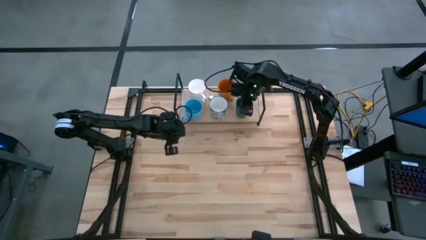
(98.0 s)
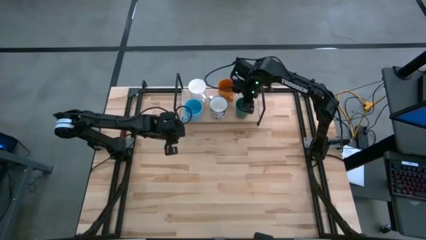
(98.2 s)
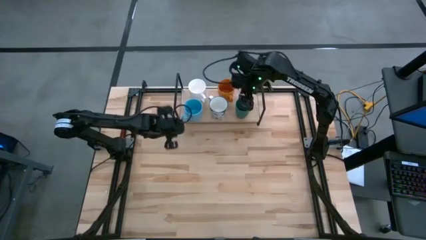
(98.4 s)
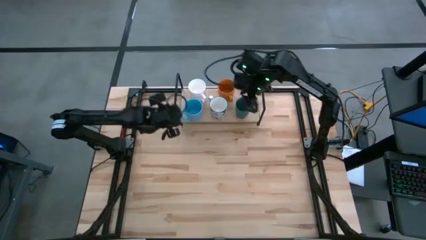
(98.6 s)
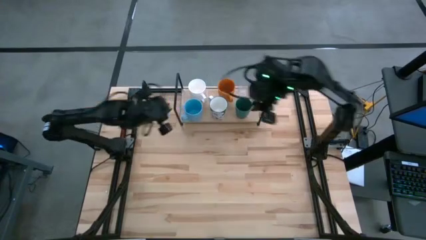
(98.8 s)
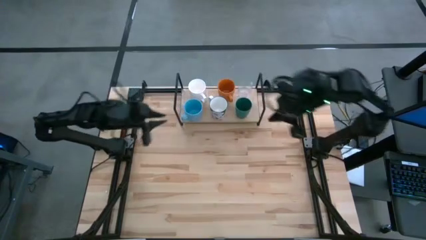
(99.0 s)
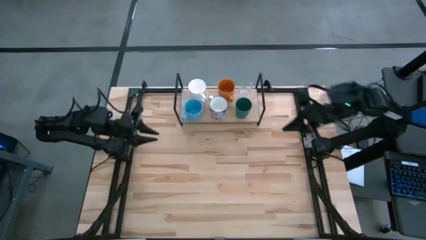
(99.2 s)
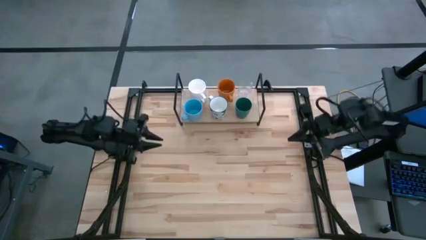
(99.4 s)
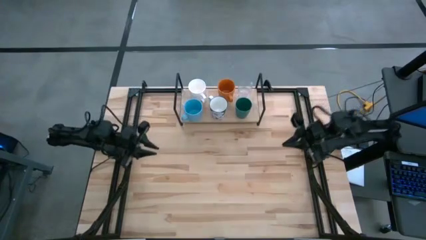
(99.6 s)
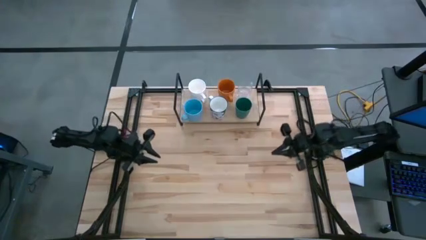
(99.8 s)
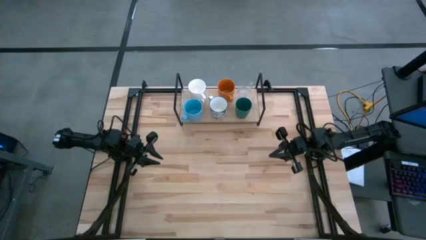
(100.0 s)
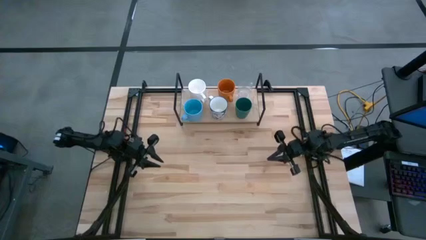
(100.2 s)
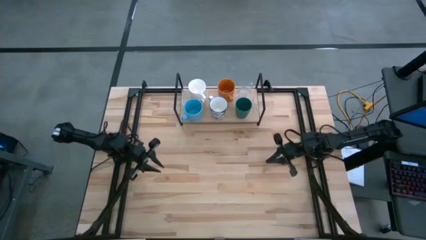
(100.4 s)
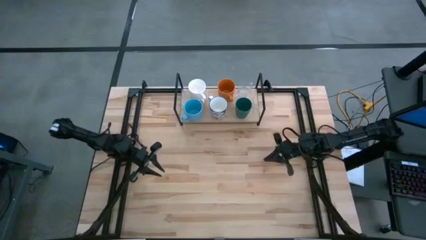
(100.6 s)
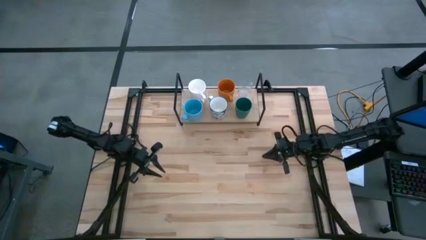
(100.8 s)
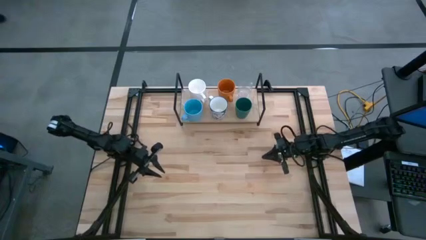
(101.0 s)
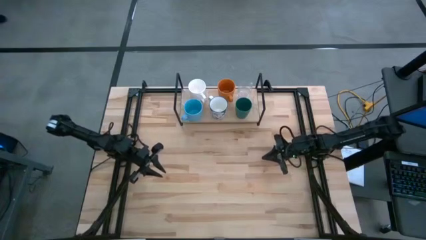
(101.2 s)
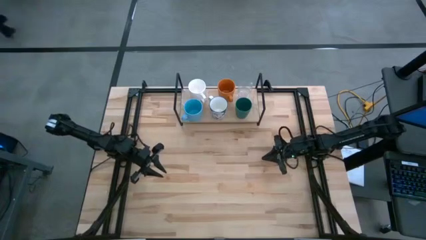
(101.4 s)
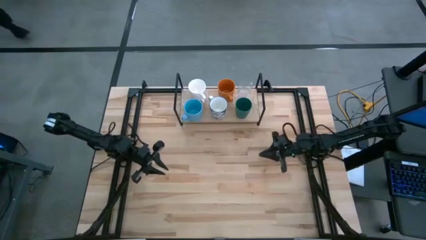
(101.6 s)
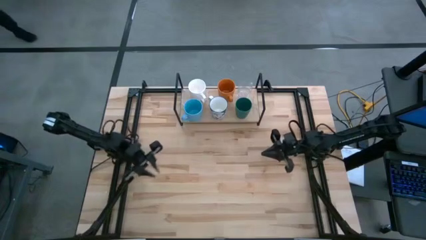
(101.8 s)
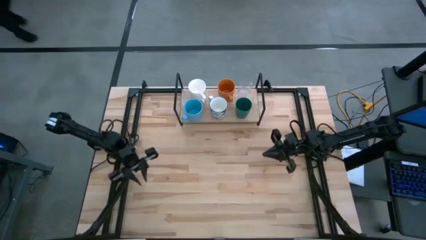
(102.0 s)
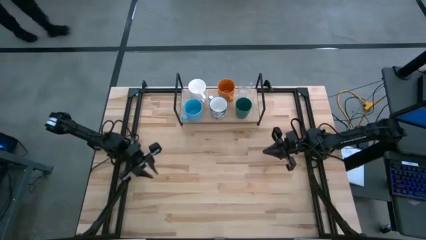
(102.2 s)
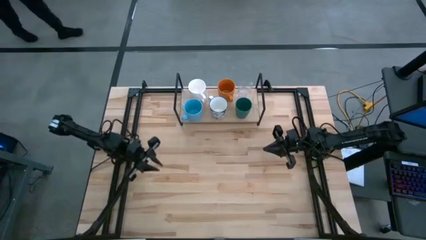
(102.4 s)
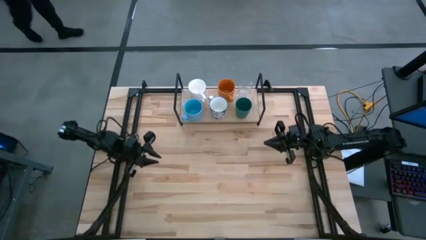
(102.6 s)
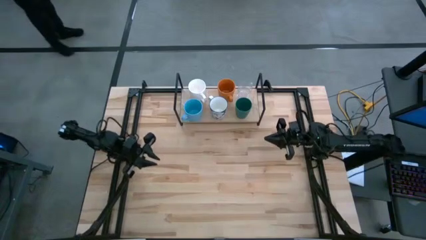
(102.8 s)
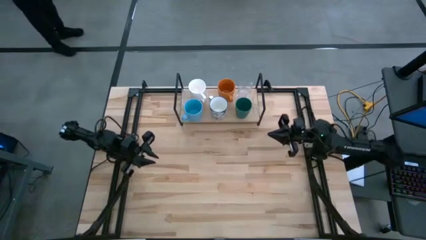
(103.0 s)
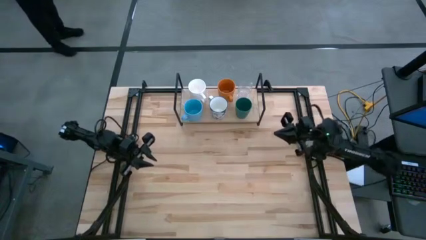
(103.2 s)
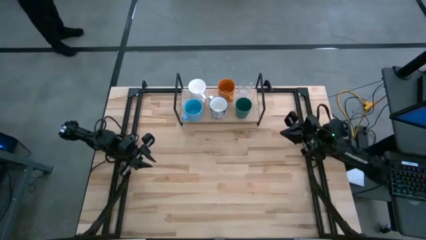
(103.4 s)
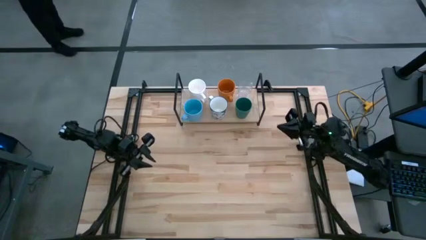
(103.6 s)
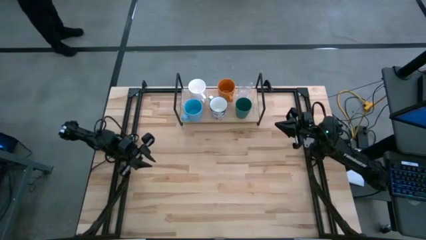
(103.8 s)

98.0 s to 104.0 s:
Task: Stack small to large cups/mugs on shelf
Return to Home Position

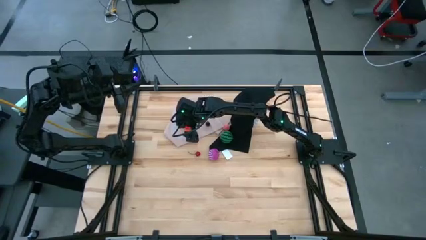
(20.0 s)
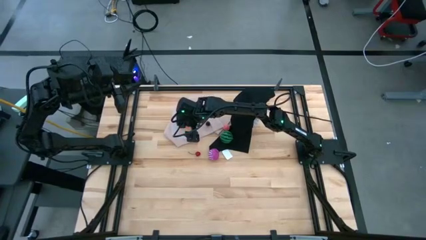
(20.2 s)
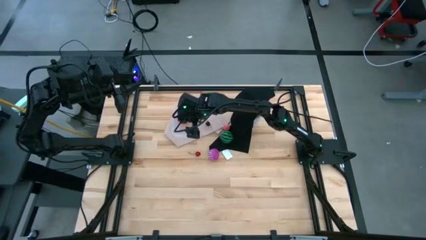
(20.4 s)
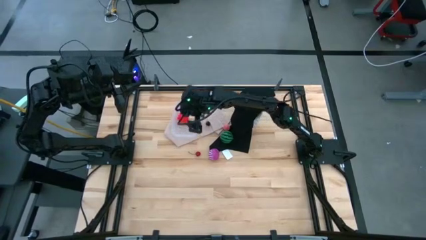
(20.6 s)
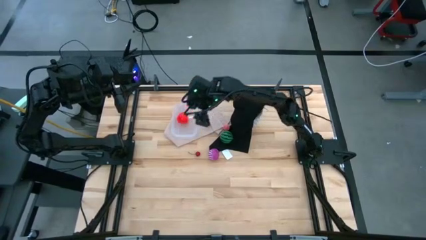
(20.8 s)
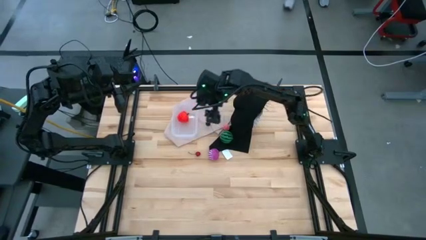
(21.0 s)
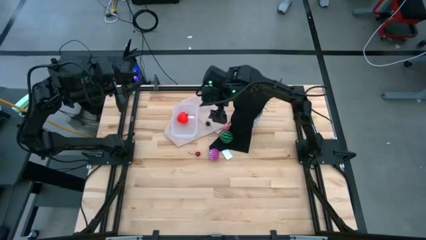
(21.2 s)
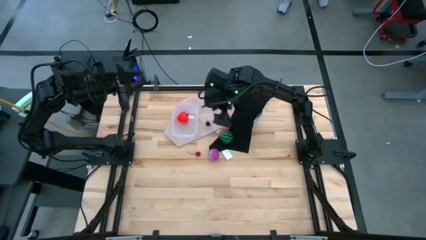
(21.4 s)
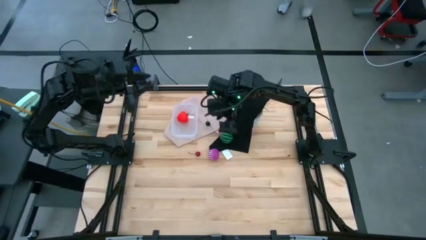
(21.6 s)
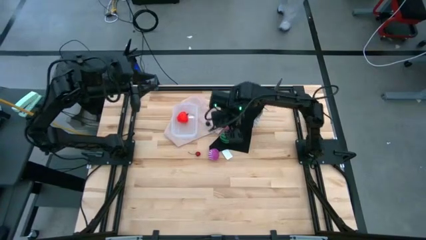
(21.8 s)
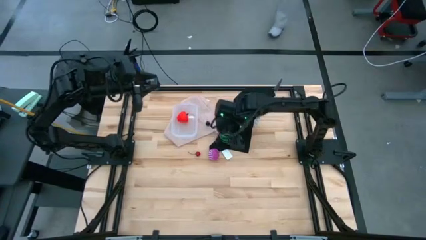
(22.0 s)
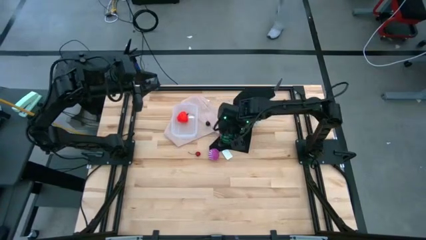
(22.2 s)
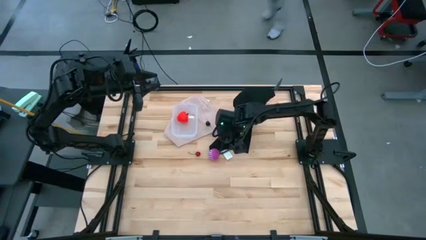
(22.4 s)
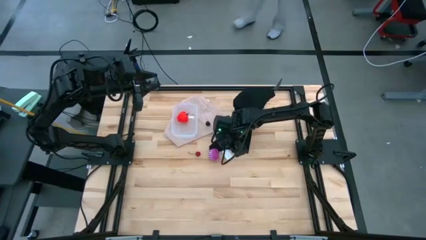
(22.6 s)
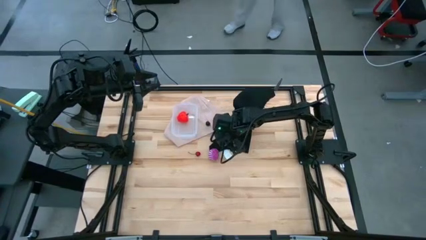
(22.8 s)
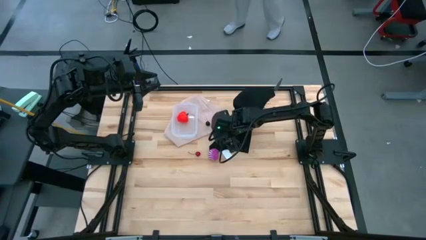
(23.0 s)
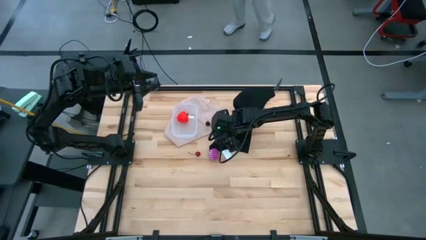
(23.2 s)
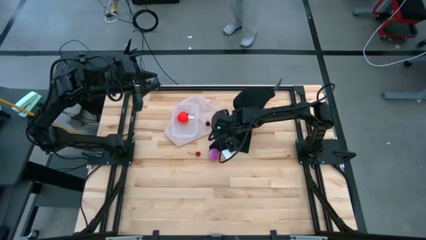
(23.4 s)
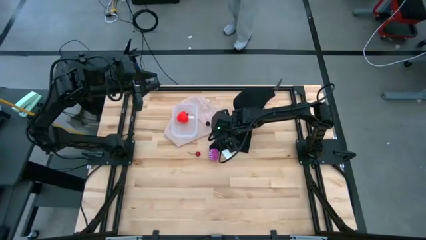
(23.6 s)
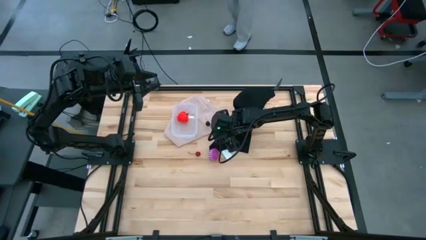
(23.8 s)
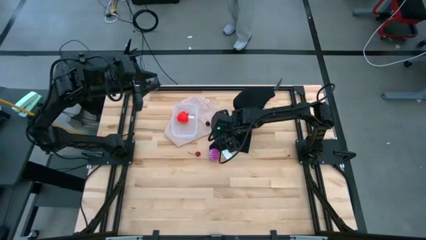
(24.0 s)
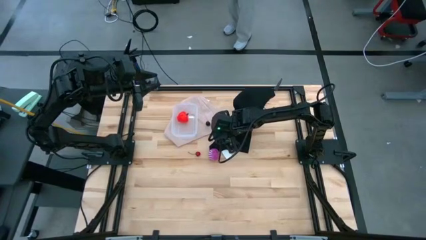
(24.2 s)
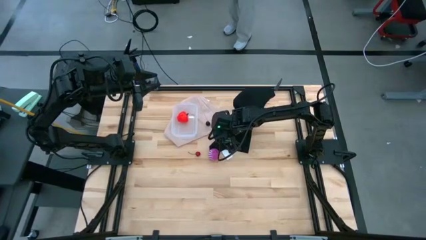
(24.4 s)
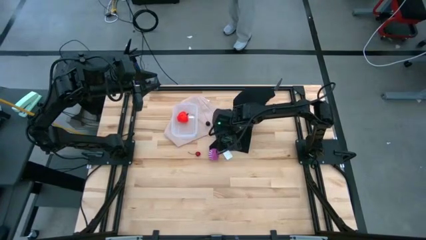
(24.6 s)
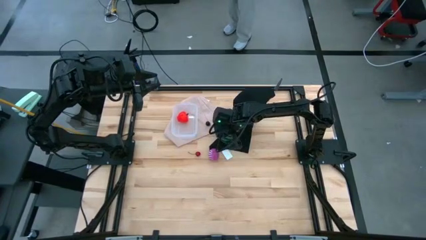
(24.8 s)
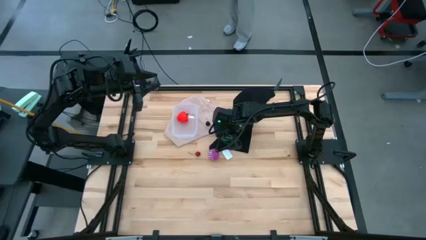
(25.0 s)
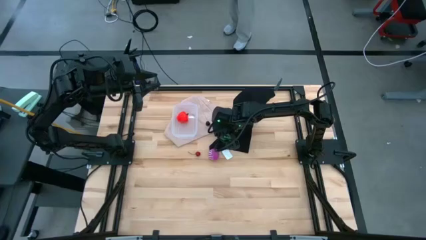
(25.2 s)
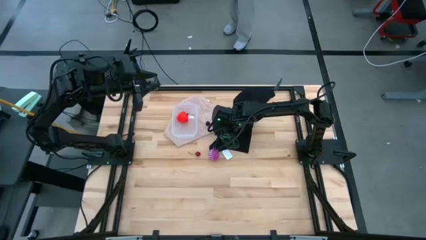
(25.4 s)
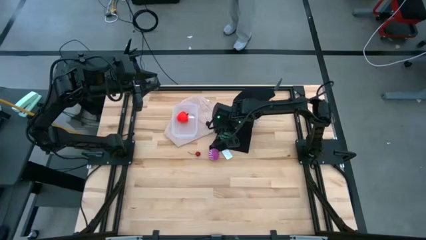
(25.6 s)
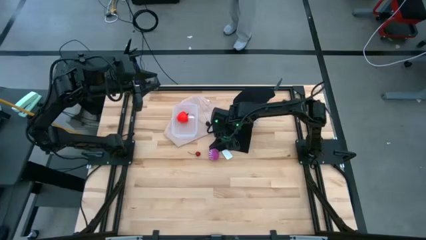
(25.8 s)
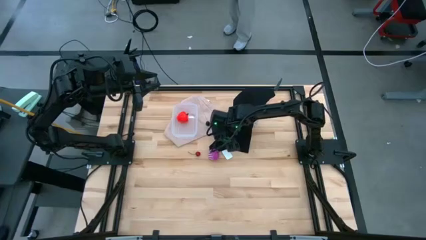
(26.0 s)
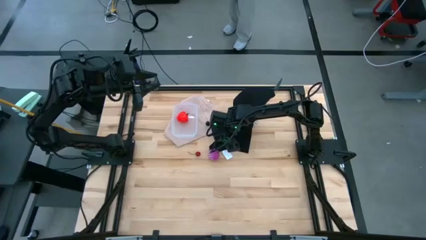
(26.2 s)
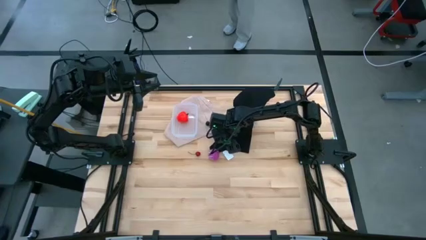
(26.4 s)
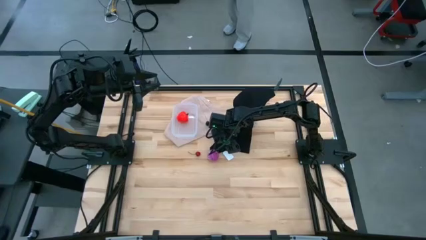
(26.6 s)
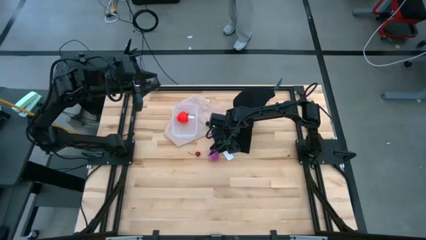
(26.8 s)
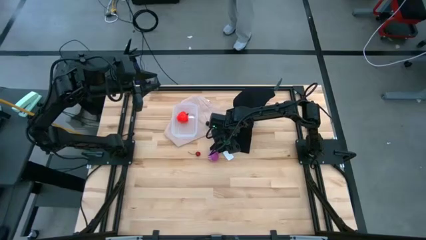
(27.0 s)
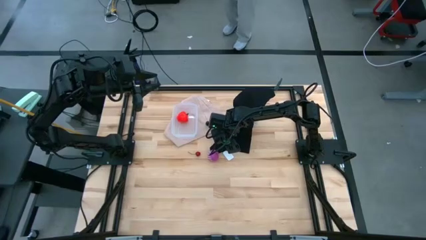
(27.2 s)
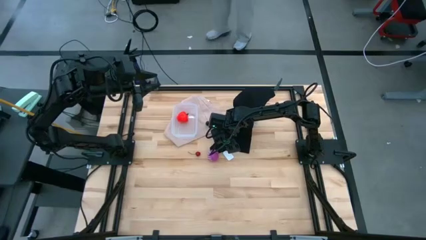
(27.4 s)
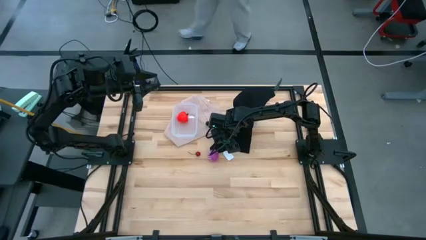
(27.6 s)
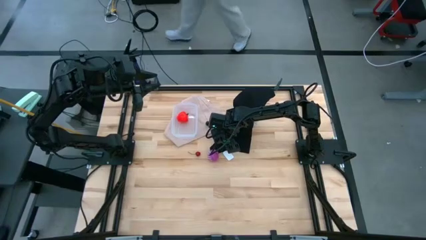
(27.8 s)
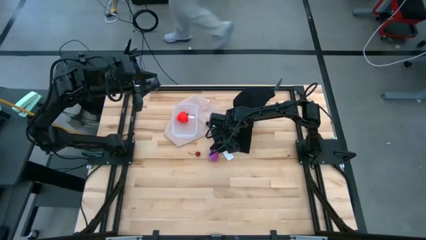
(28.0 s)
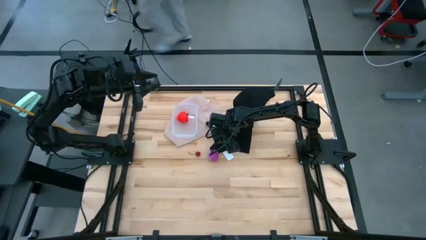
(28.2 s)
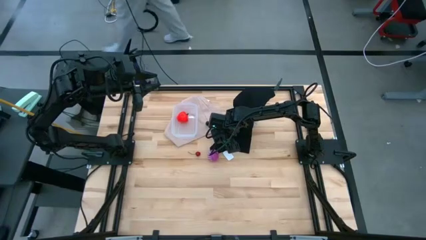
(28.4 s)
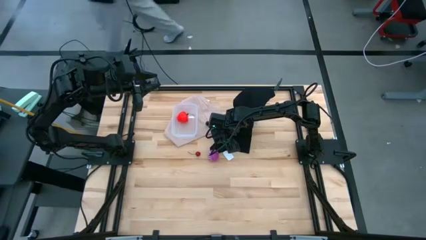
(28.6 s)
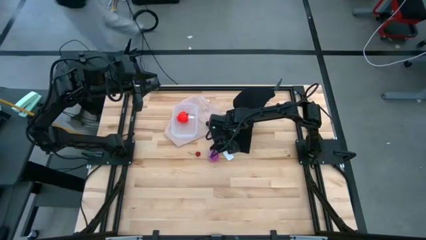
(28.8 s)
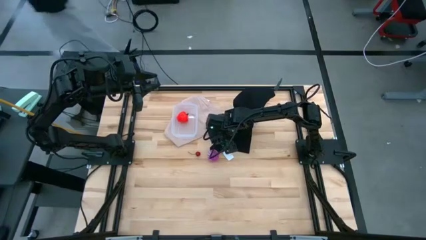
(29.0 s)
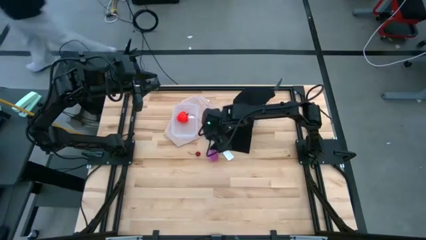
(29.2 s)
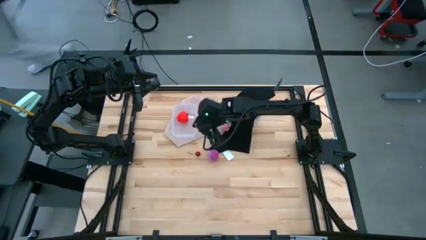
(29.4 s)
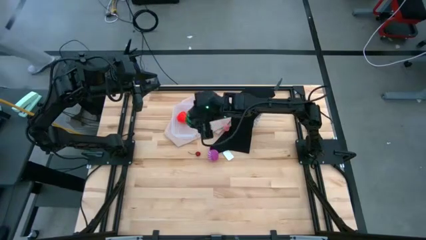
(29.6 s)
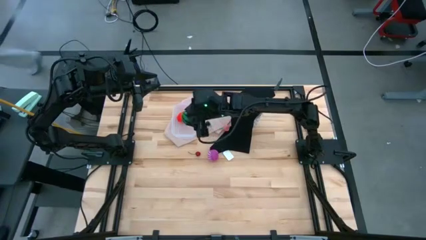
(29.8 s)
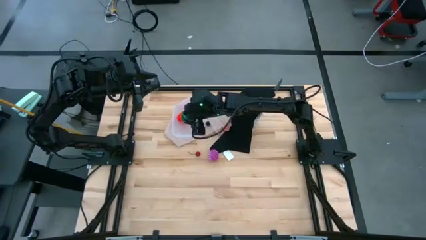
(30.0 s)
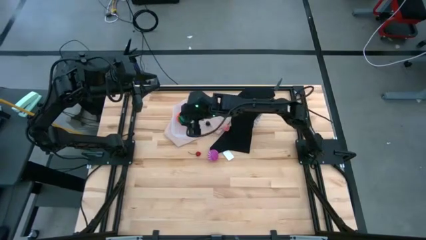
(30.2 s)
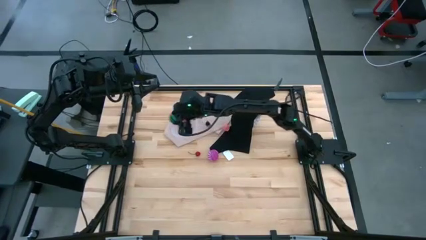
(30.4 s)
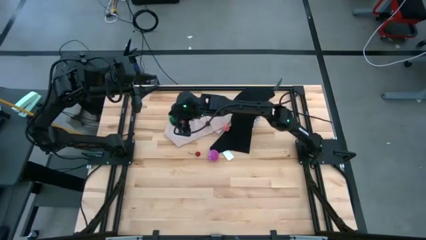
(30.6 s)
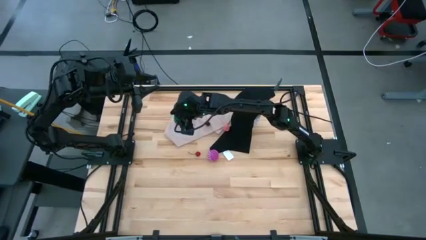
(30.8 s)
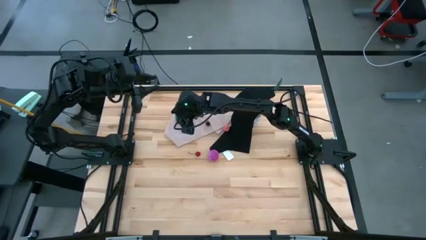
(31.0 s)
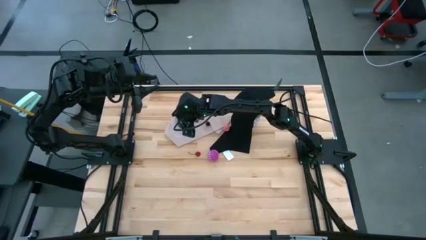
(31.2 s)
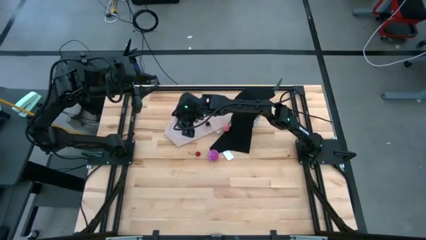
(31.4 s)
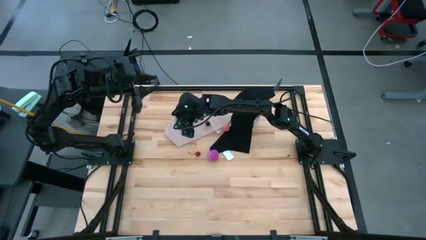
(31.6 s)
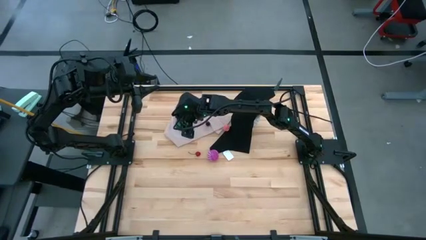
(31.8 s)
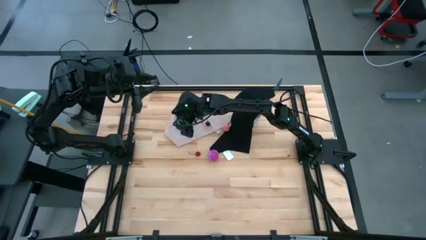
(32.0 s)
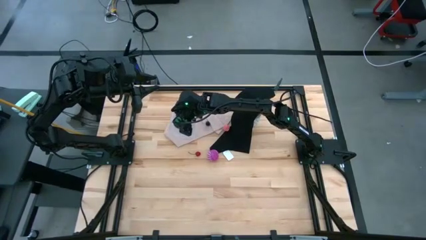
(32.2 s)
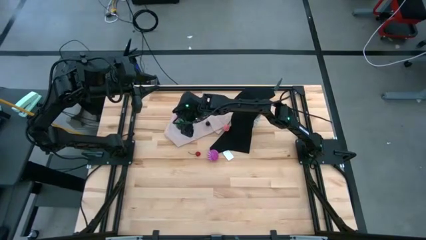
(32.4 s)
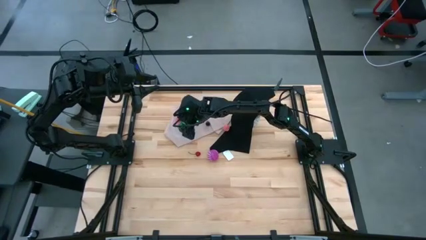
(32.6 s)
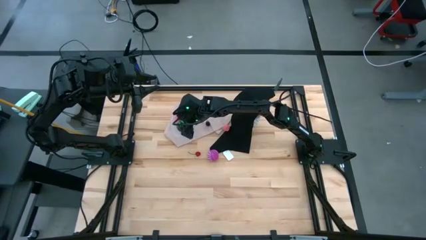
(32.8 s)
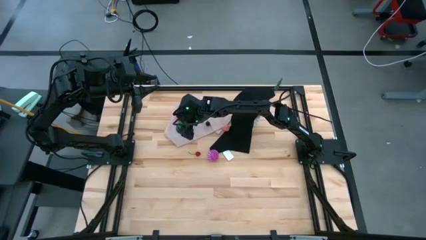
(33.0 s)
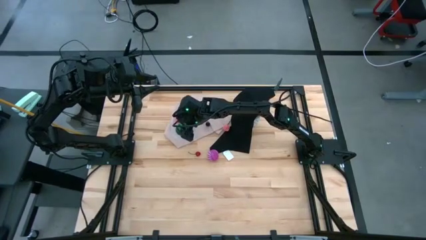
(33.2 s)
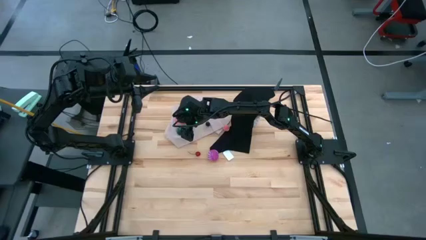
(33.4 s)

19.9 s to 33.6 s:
Task: Pick and placing Produce into tupperware
Put the green watermelon into the transparent bin
